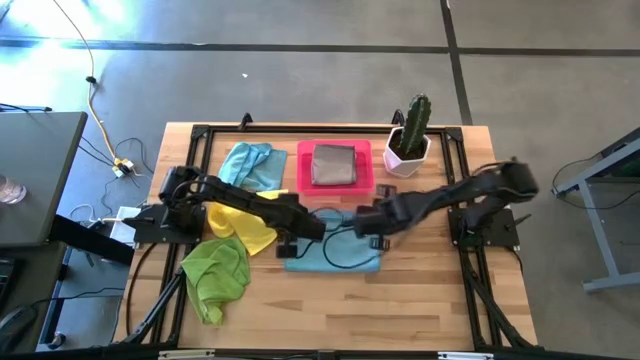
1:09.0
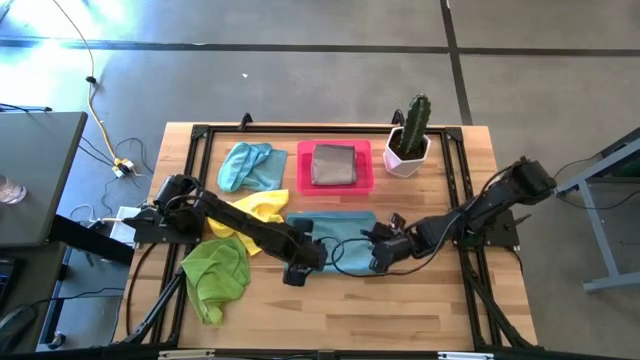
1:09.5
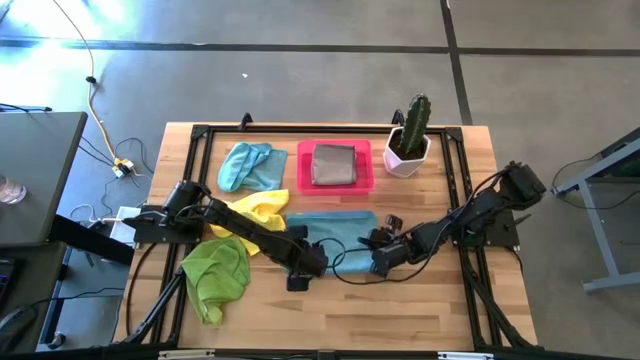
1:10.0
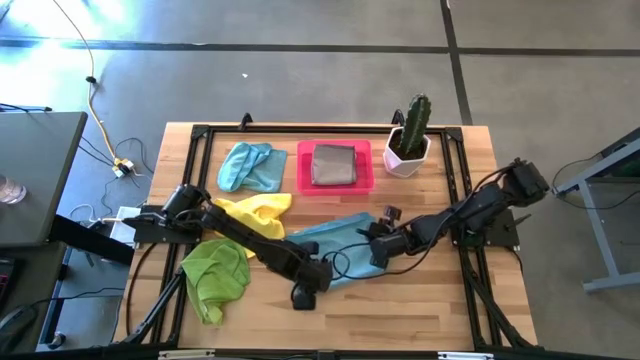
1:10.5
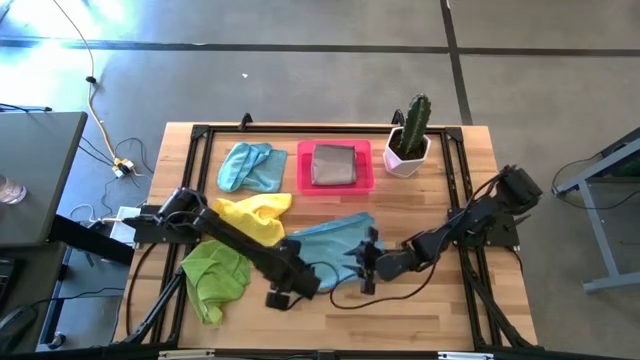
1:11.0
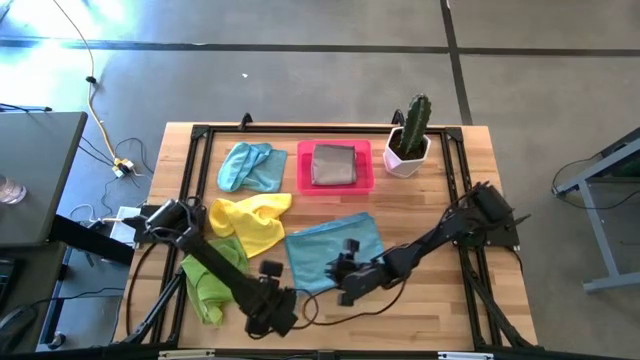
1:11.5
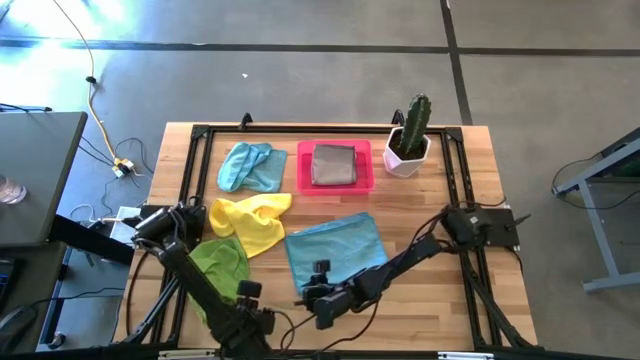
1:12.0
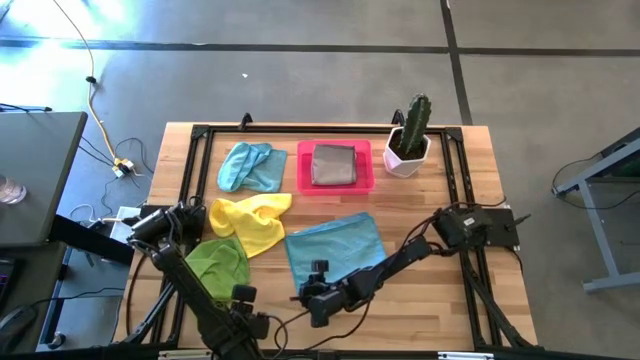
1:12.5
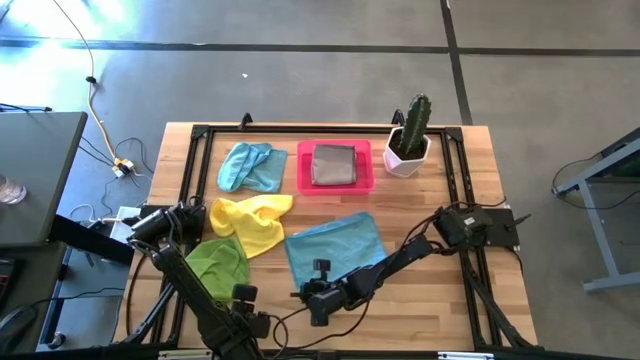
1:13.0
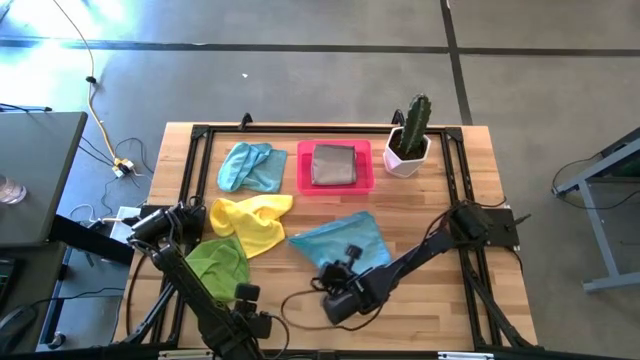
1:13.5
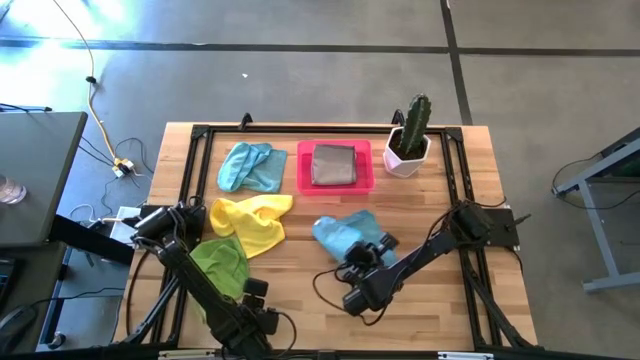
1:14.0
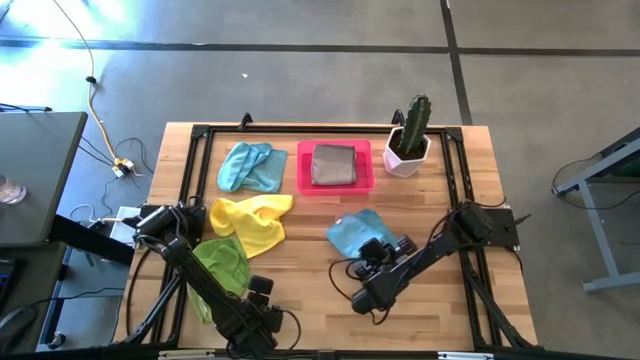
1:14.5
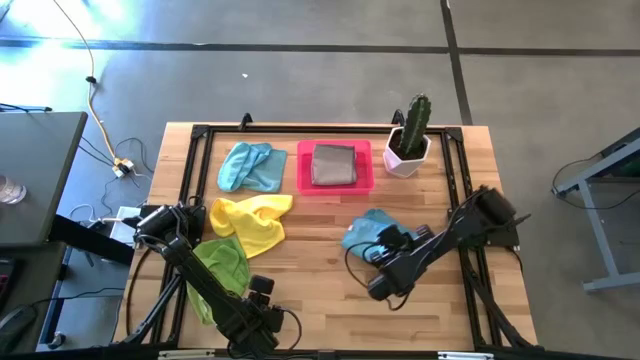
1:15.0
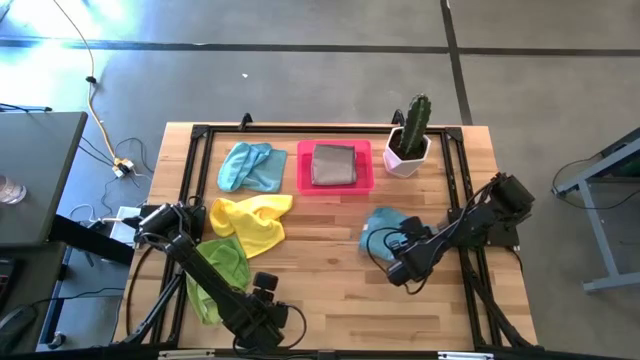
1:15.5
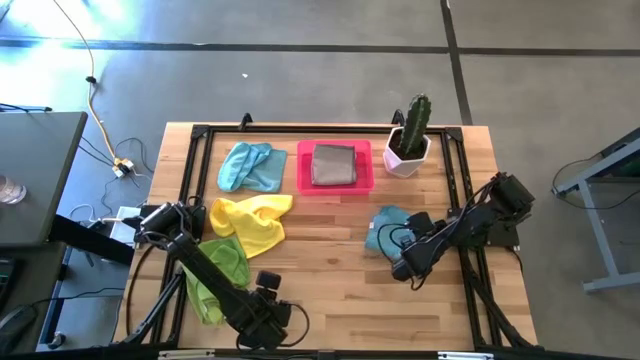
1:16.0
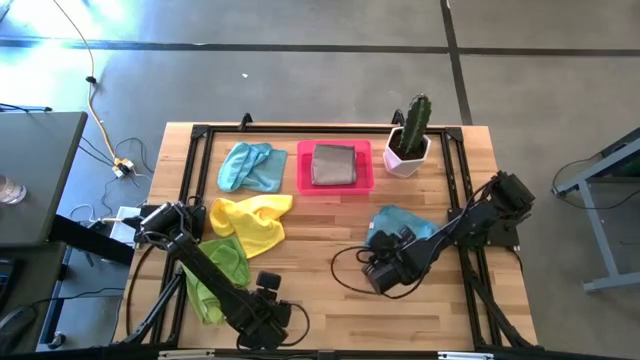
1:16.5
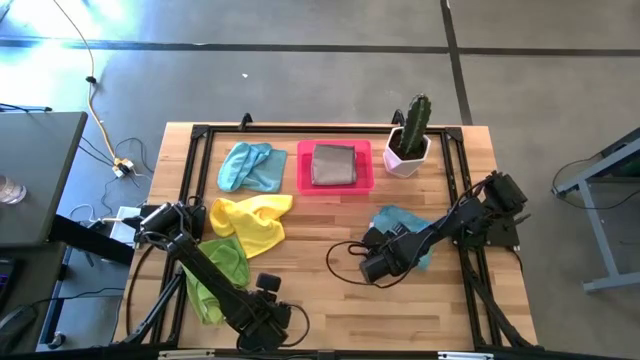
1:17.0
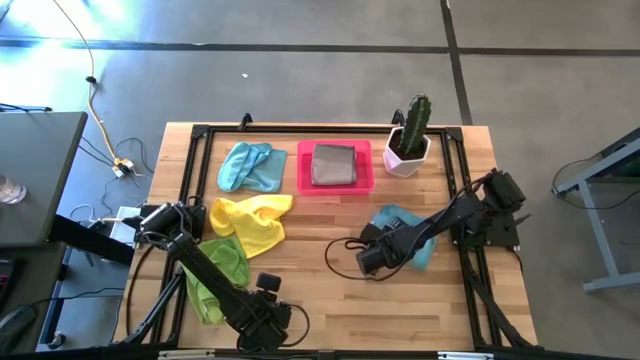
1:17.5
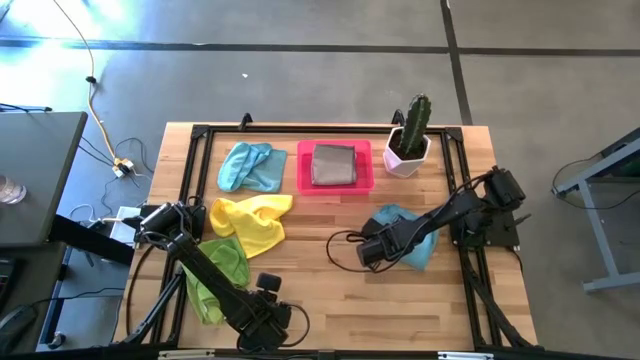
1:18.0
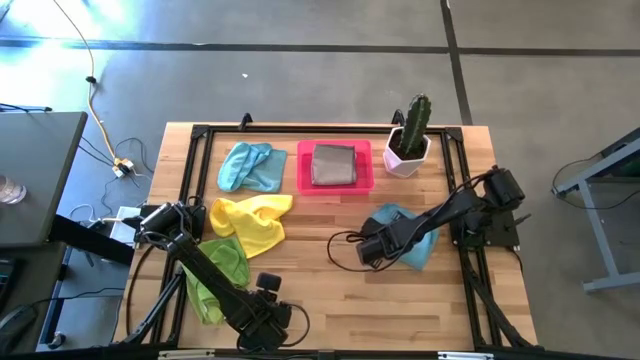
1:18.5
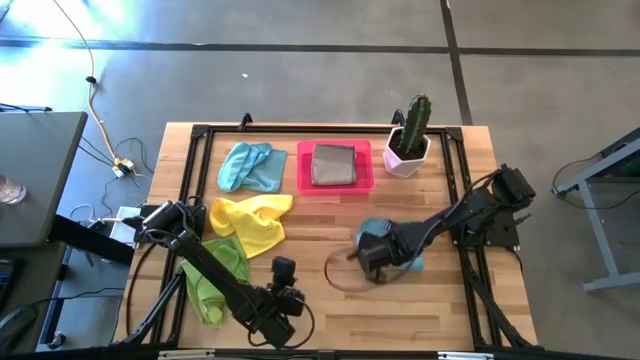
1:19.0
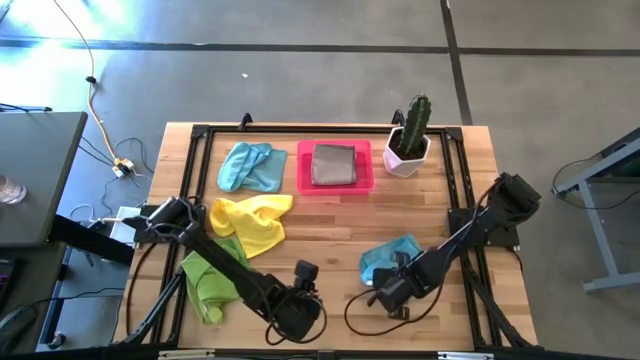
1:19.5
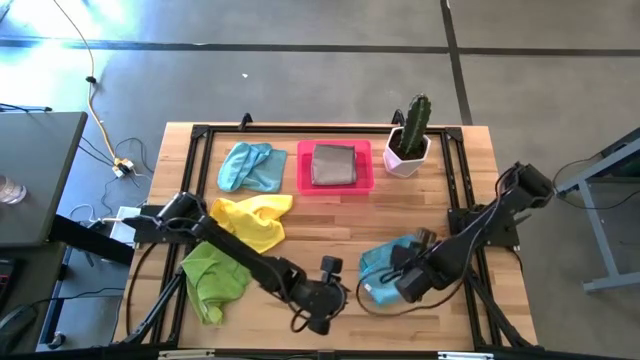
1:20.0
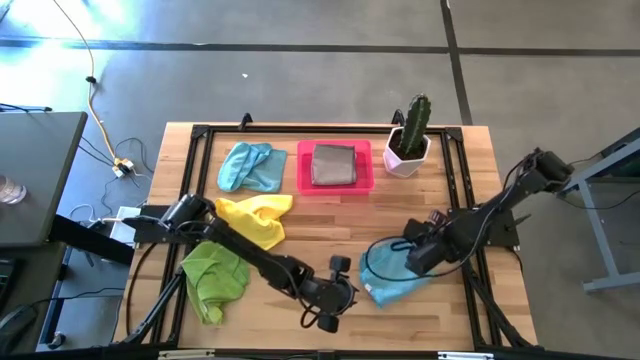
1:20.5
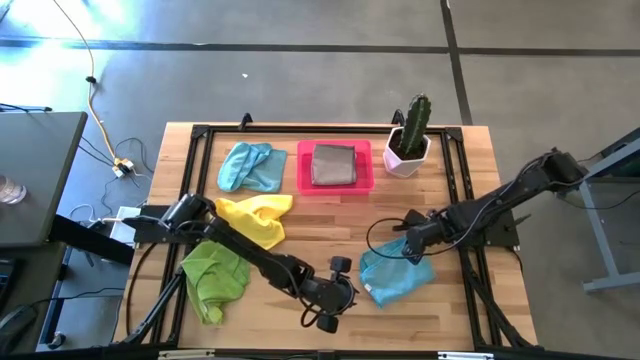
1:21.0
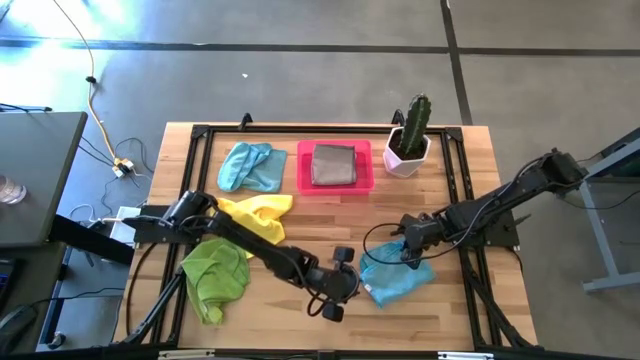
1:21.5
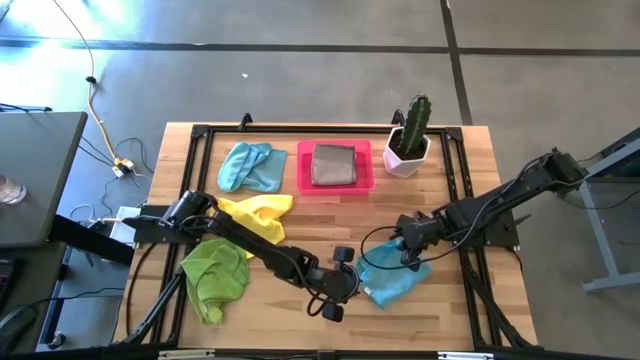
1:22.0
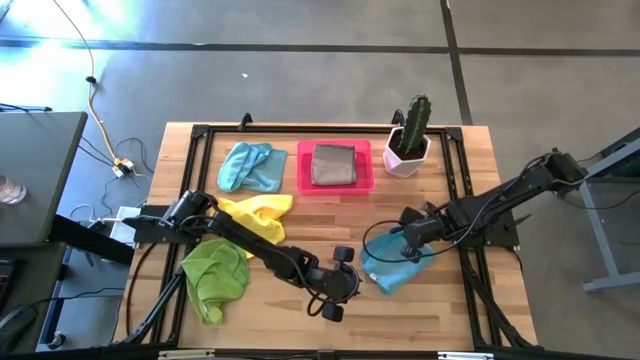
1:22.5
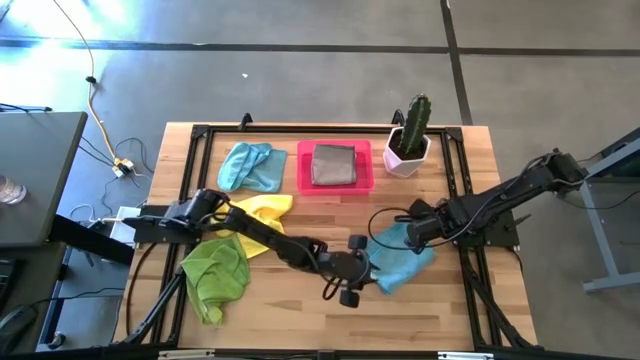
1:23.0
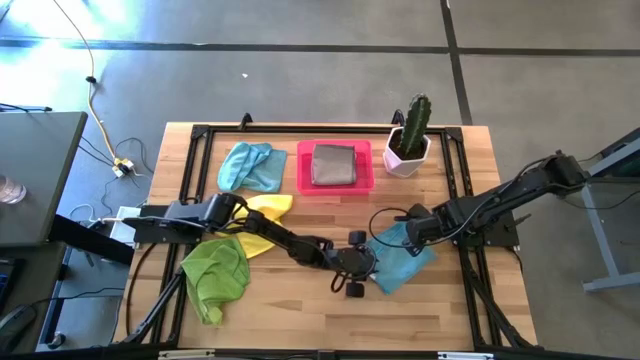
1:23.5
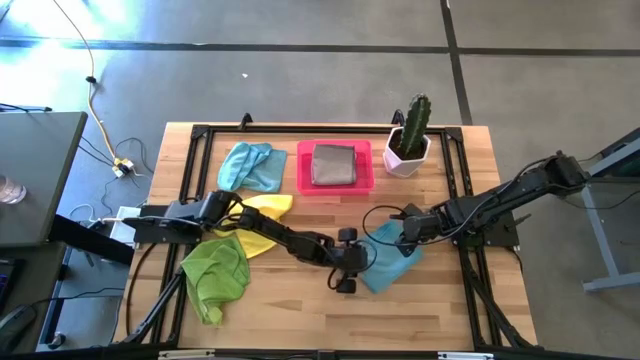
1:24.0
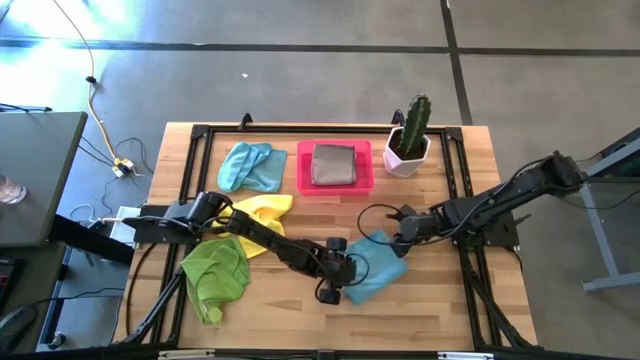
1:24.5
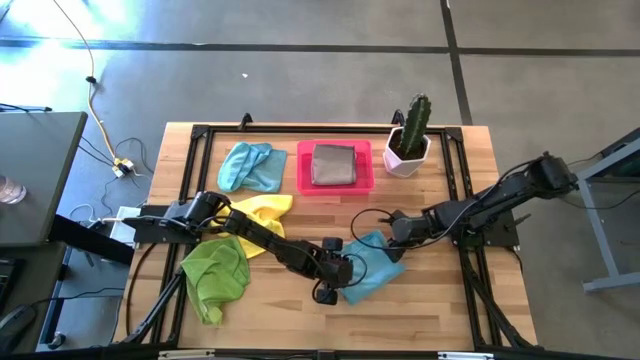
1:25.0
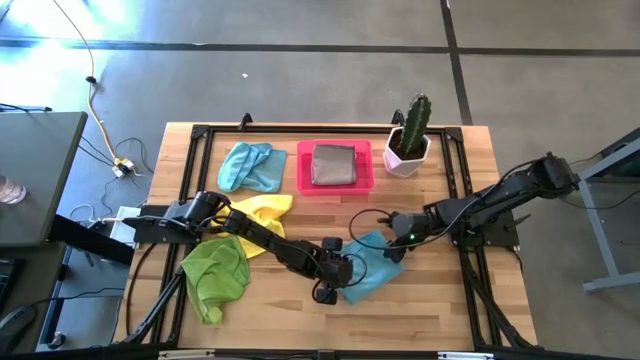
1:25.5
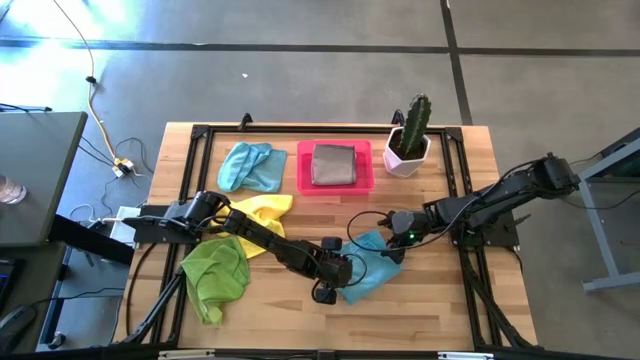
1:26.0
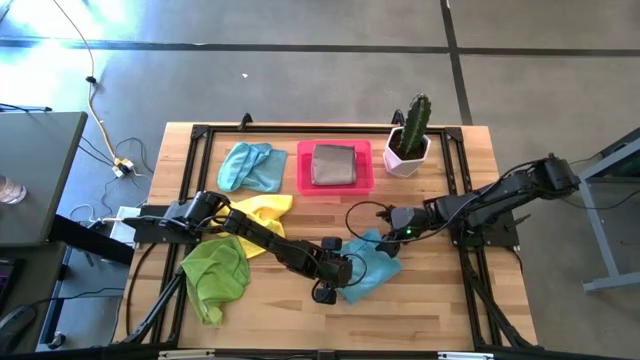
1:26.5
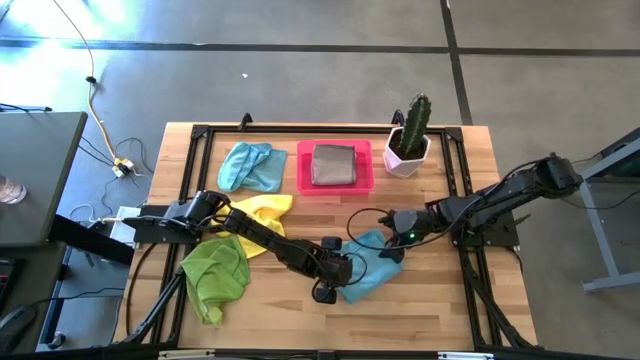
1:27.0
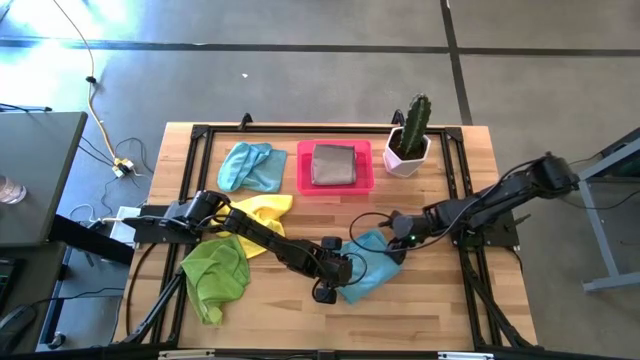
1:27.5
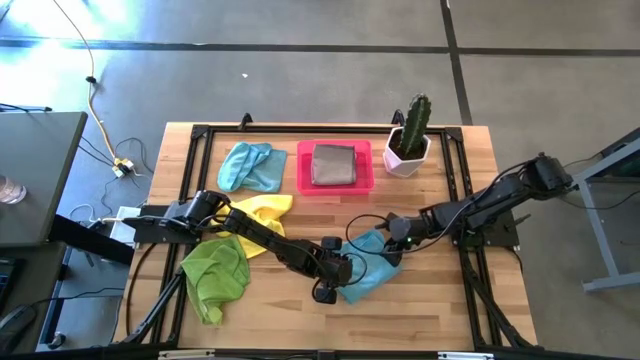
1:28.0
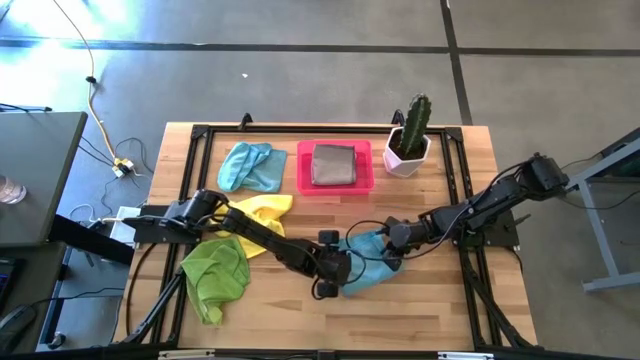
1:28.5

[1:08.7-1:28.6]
Task: Fold microfiber towels
Fold the bottom blue microfiber cloth

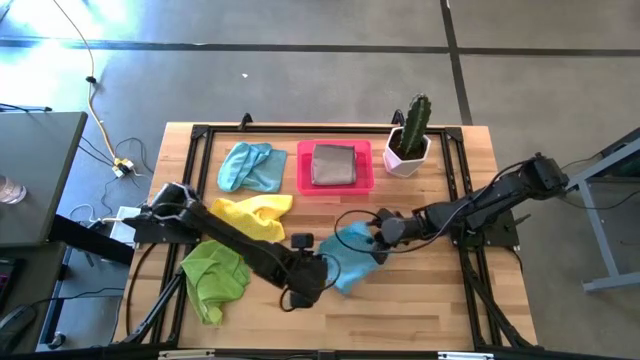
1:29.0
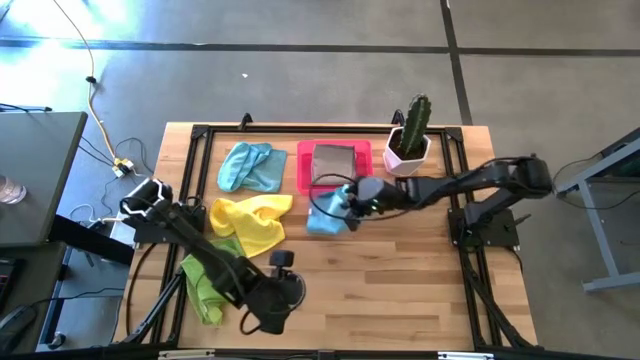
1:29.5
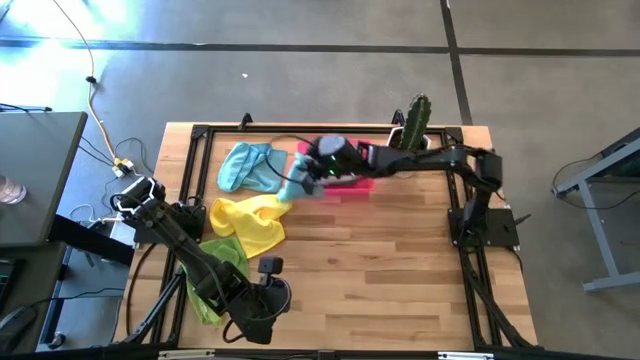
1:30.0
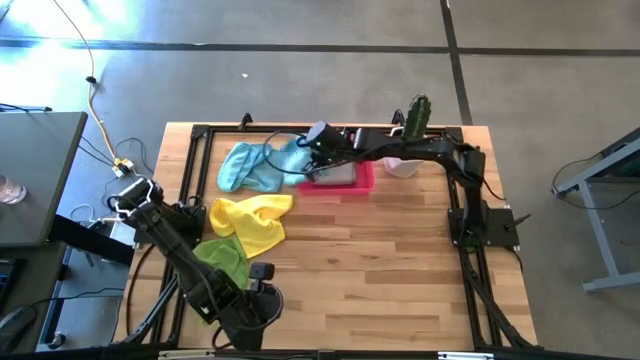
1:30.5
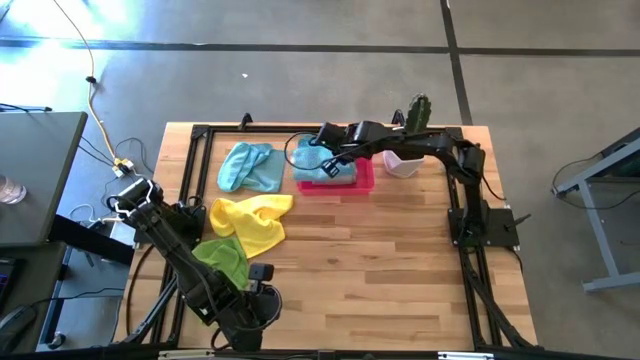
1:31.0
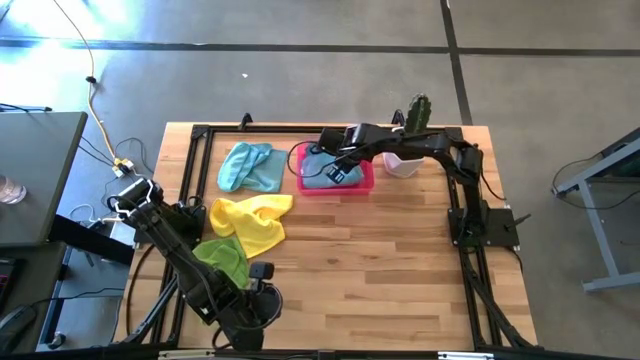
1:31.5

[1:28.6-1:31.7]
Stack the bottom blue microfiber cloth on top of the gray microfiber cloth in the pink bin
